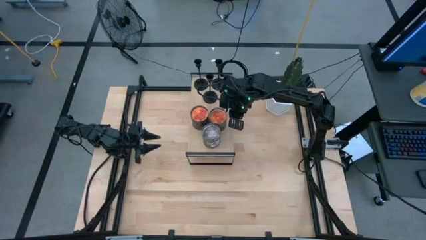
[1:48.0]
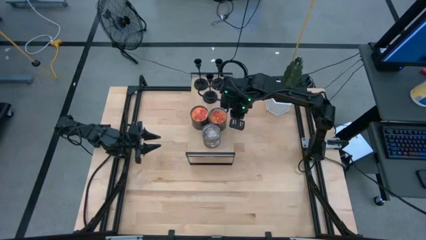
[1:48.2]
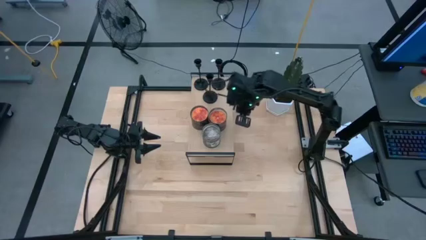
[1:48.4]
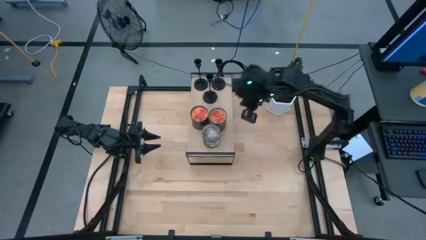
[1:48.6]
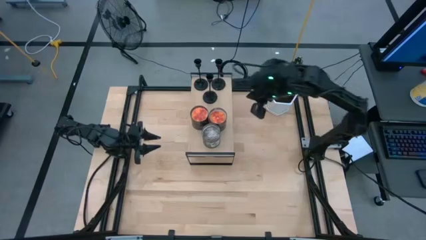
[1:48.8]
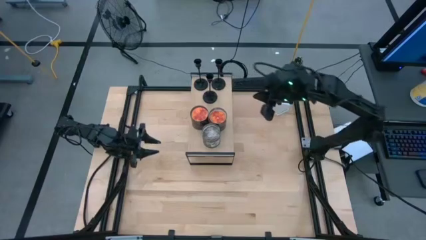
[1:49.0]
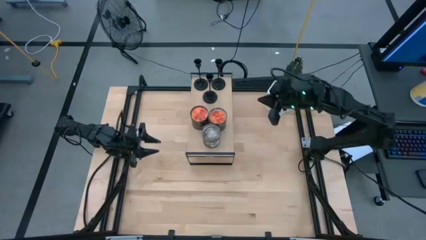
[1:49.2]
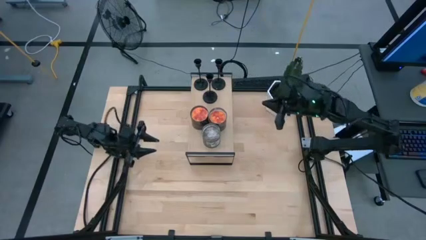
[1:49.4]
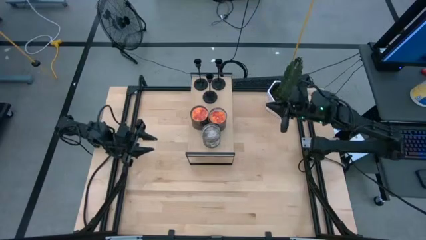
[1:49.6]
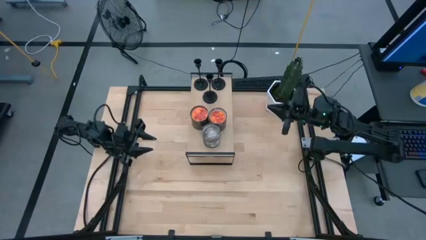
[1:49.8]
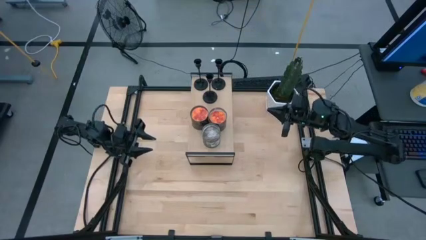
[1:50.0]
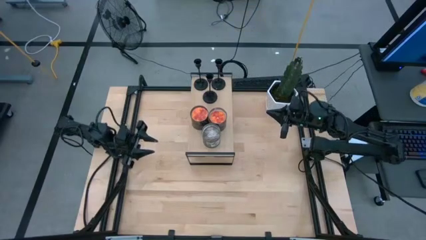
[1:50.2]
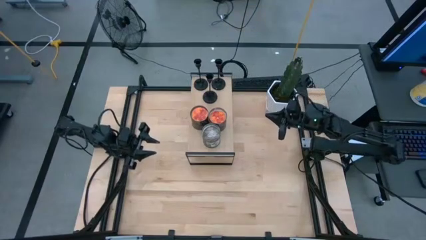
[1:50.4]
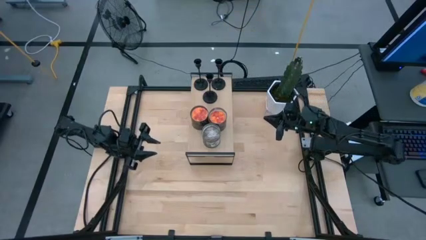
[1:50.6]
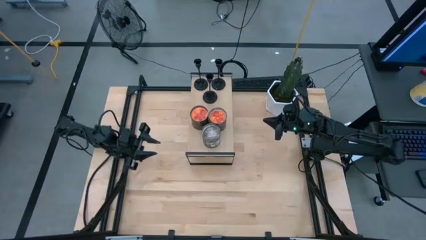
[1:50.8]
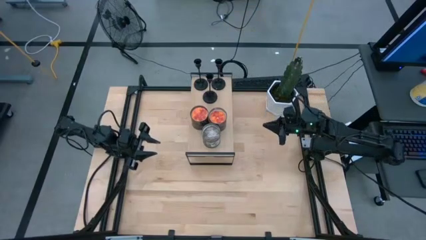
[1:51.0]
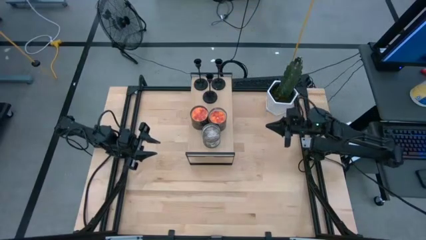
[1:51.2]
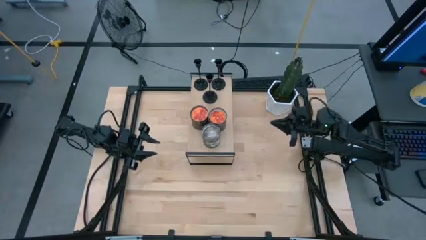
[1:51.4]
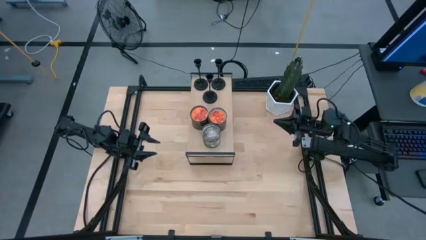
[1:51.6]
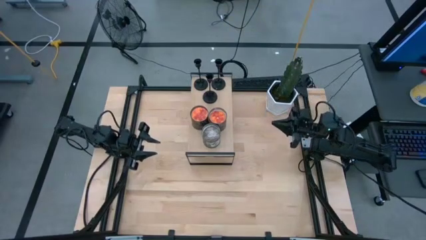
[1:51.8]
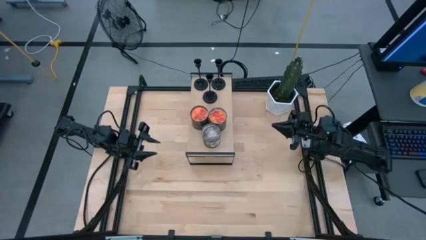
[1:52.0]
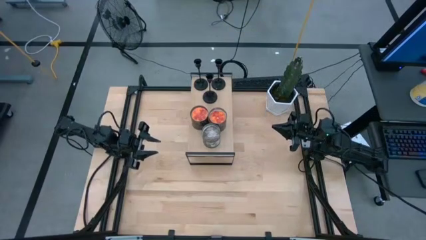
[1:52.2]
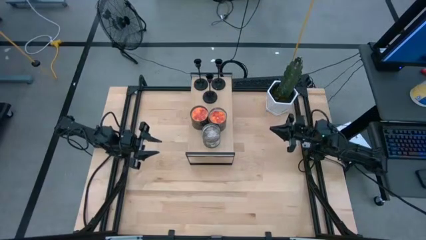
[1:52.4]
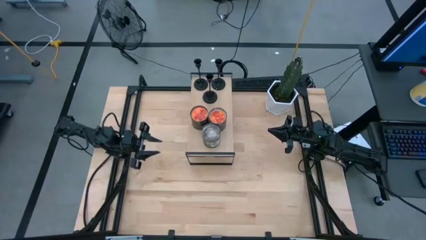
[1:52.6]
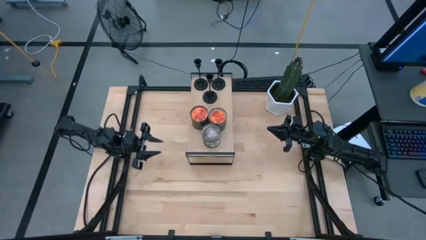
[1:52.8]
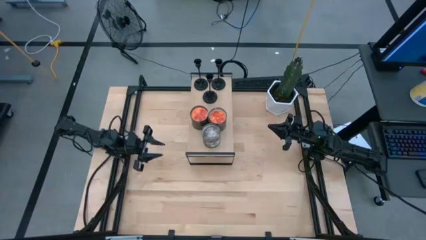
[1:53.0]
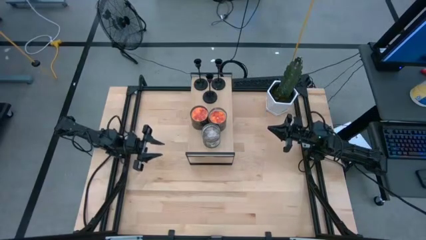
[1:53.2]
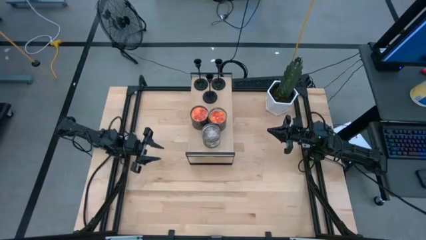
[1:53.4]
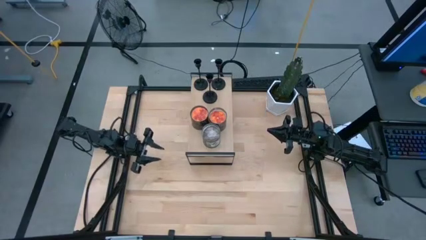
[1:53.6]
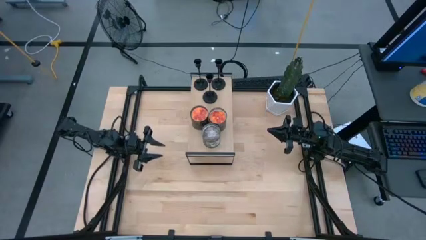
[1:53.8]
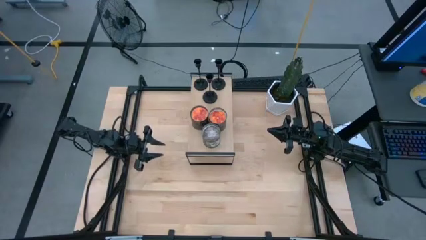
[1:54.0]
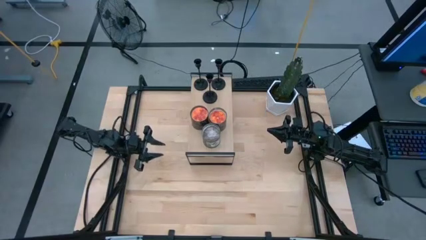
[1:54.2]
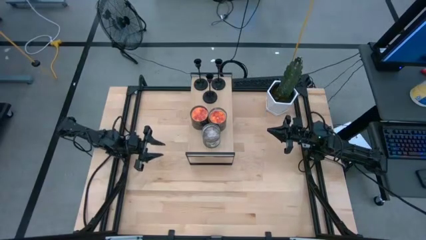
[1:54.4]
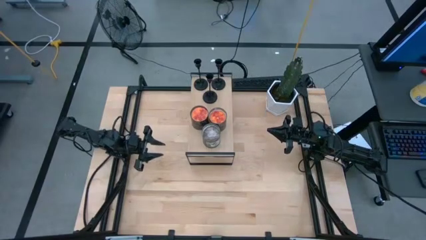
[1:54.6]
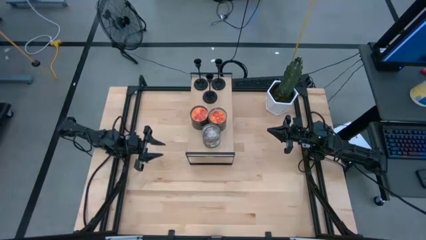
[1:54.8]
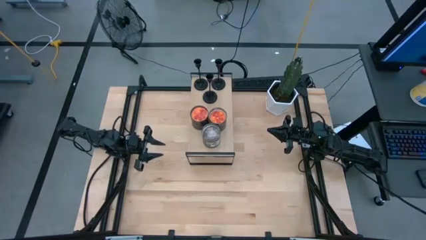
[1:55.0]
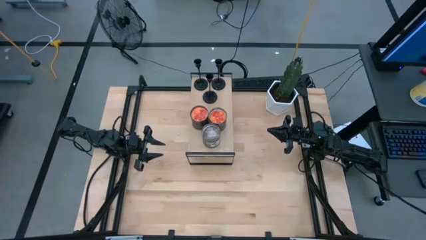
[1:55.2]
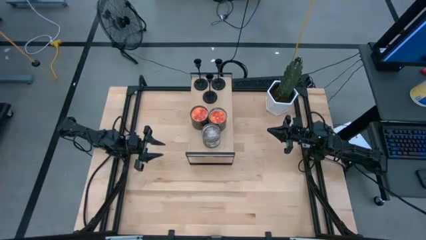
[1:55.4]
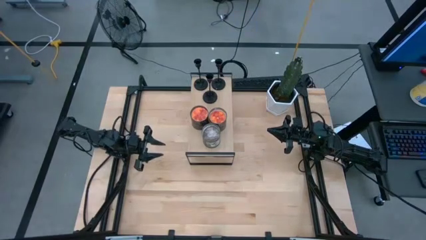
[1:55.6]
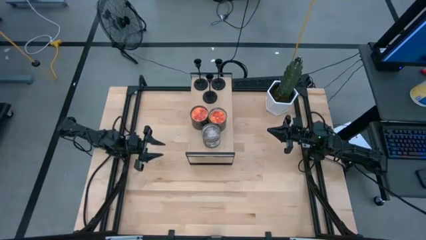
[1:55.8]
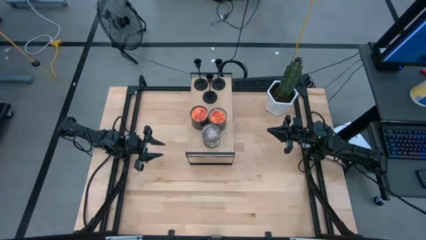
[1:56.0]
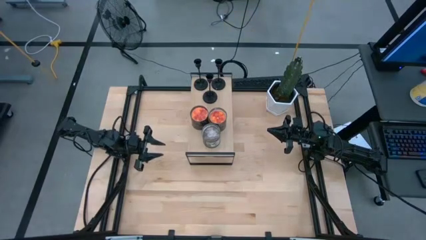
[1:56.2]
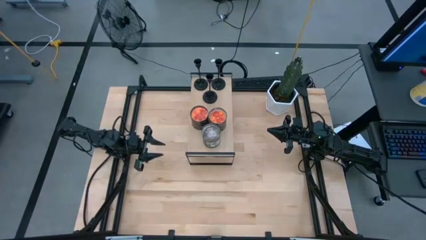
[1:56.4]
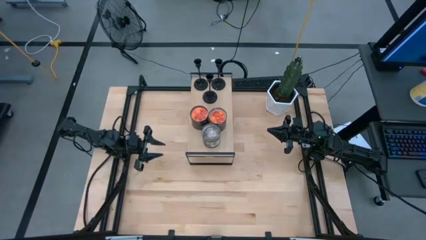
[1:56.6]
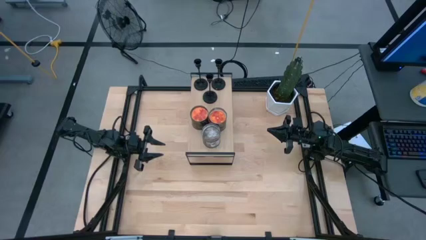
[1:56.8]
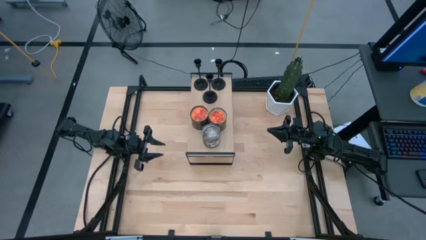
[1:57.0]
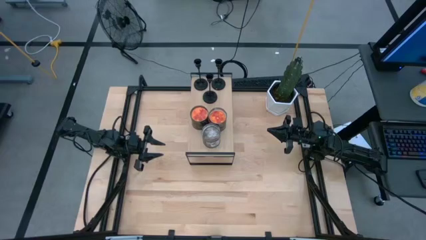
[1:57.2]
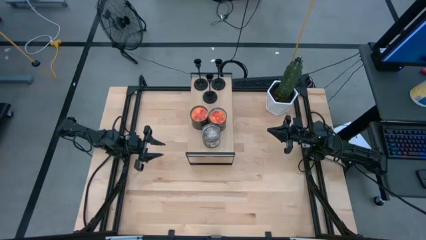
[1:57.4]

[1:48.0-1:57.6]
Task: Pick & Place candle stick holders
Return to Home Position

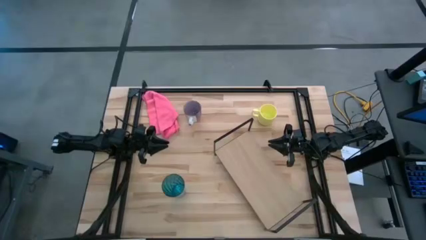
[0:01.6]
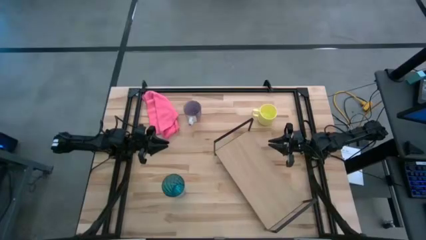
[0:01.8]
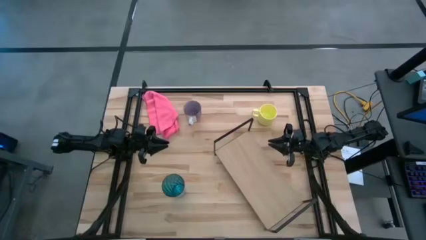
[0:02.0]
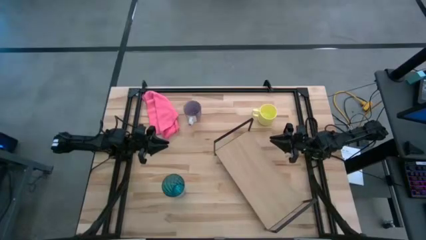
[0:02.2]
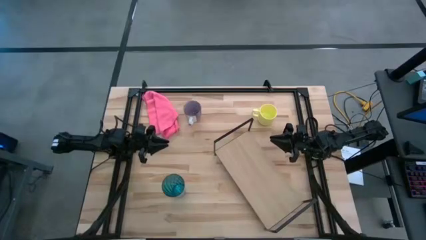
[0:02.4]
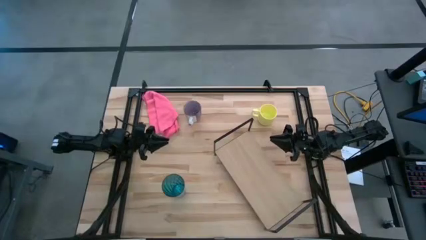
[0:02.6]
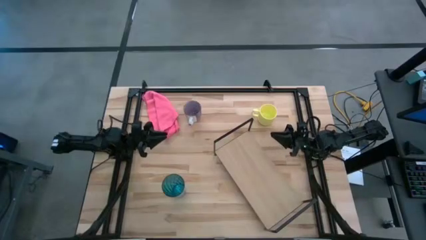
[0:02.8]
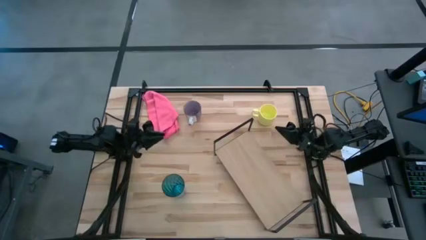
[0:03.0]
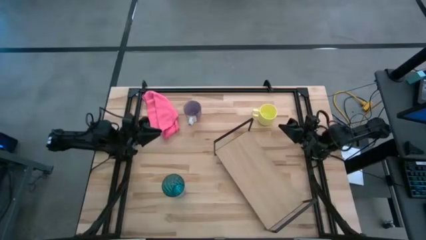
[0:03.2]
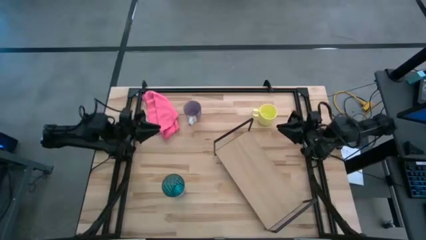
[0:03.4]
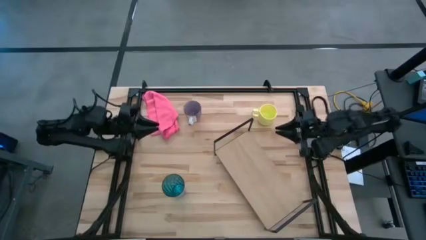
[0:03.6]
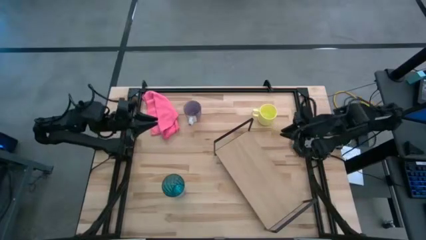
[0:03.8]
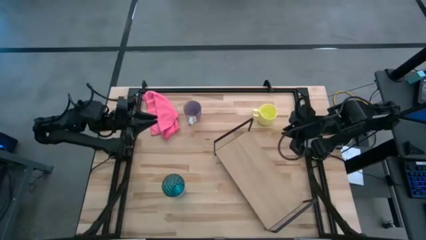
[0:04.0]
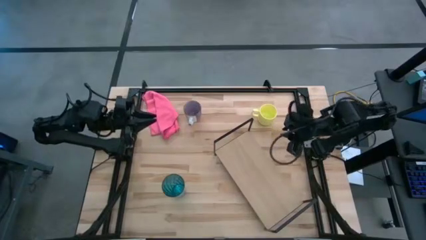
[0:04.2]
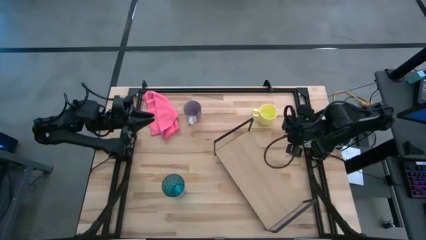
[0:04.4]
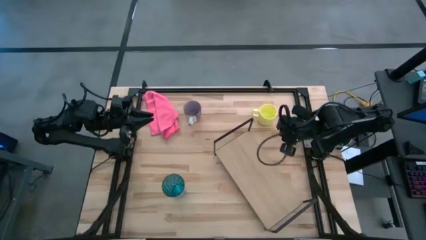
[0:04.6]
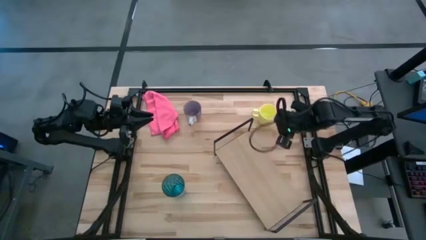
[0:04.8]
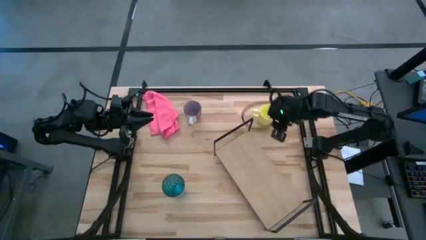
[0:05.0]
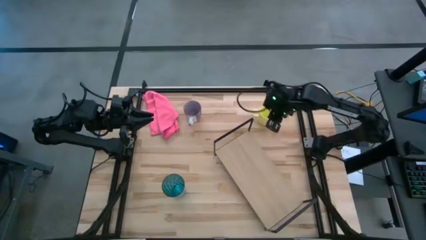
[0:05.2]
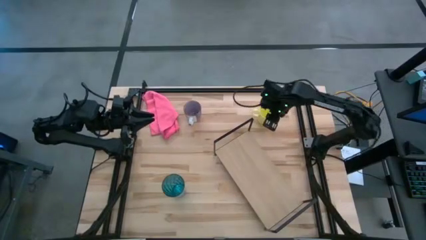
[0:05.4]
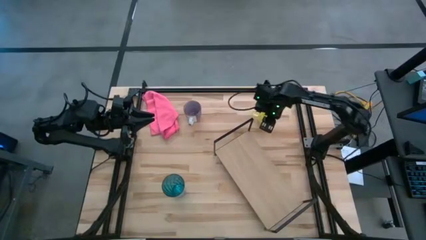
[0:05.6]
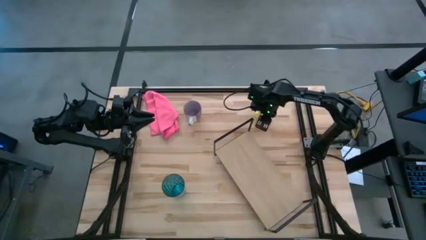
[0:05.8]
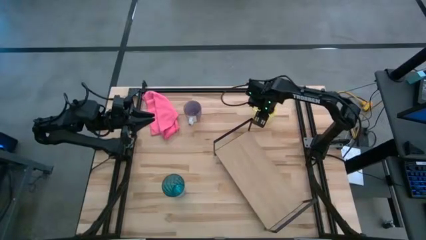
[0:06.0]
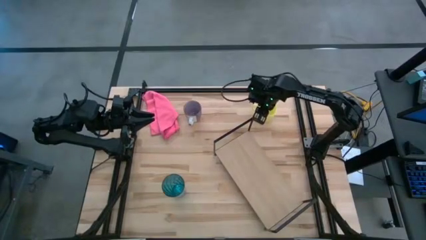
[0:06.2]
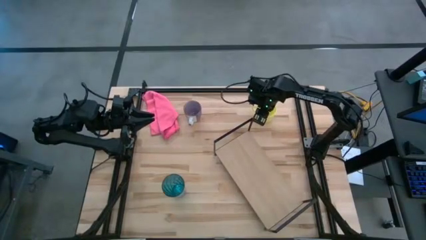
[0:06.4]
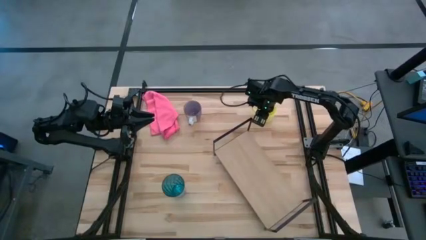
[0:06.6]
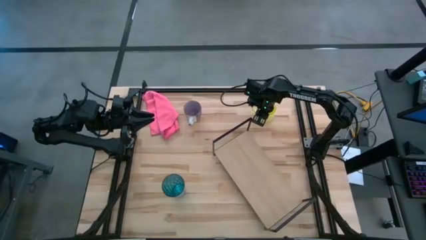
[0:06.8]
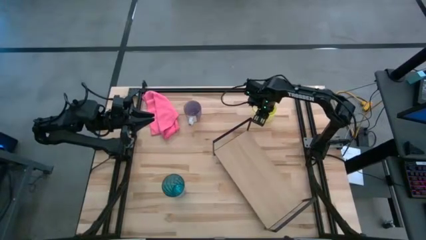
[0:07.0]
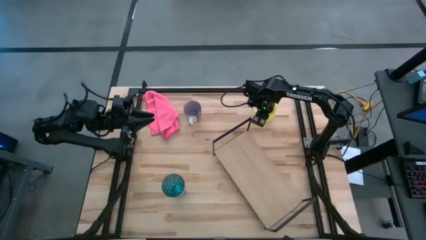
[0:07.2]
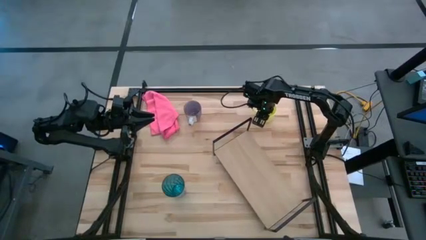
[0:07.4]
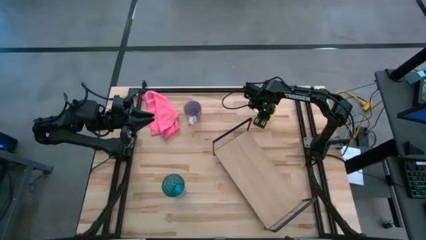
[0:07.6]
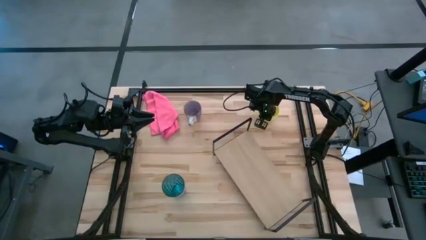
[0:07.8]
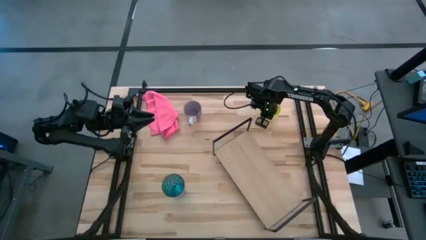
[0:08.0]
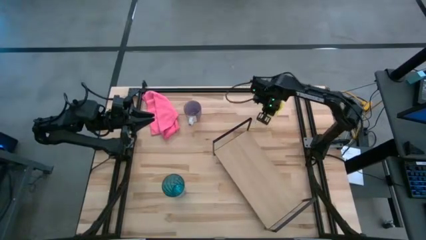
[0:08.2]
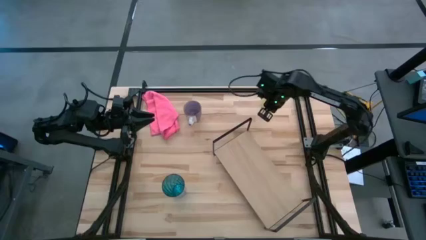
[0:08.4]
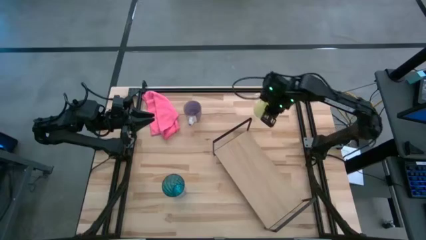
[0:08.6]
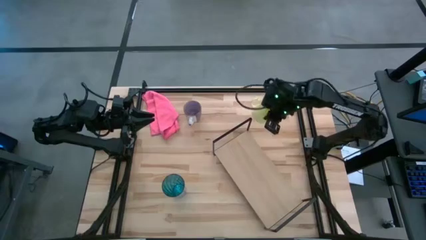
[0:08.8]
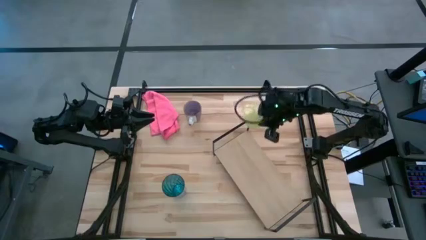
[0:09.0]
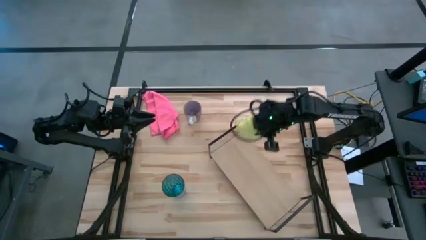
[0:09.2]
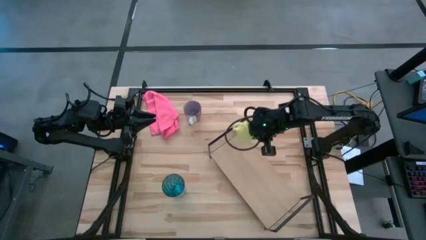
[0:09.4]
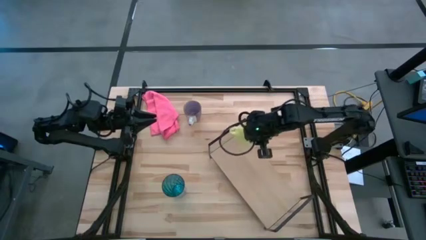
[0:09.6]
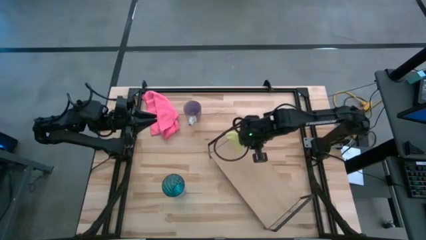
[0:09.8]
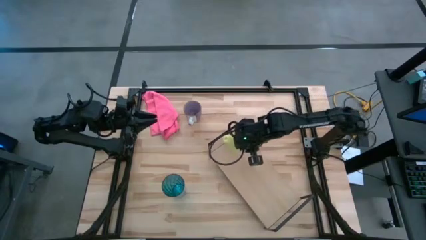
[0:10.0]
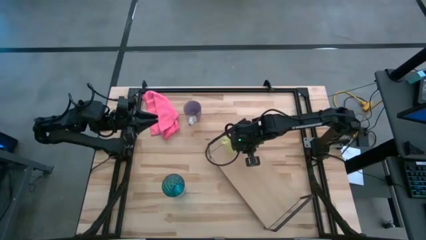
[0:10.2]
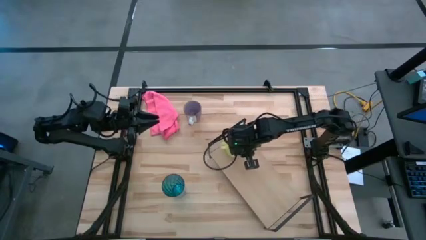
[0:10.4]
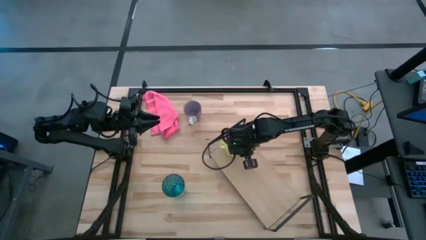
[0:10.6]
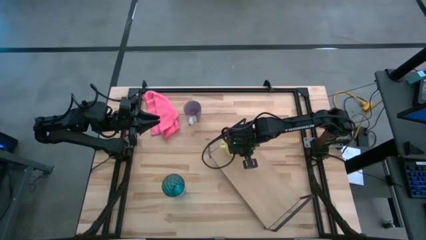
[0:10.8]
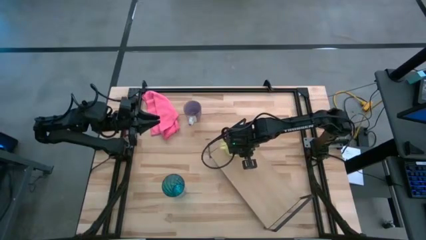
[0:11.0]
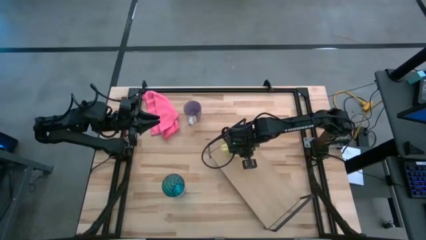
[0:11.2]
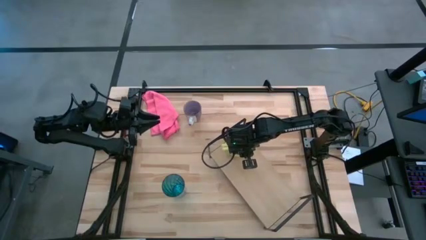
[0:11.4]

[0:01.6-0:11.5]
Task: Stack small to large cups/mugs on shelf
Put the yellow mug on the shelf
